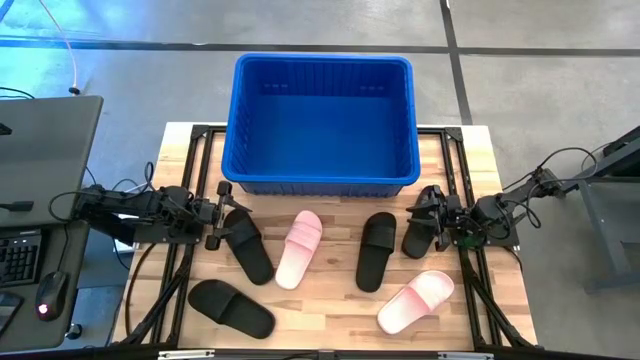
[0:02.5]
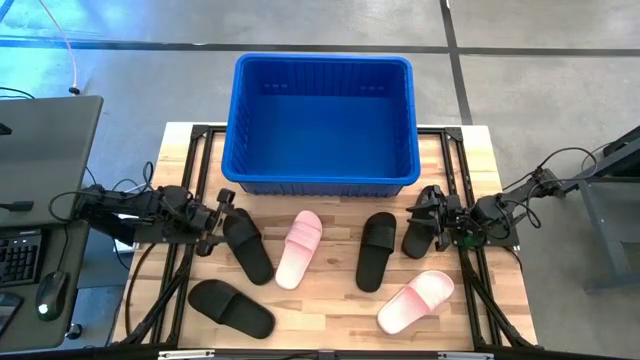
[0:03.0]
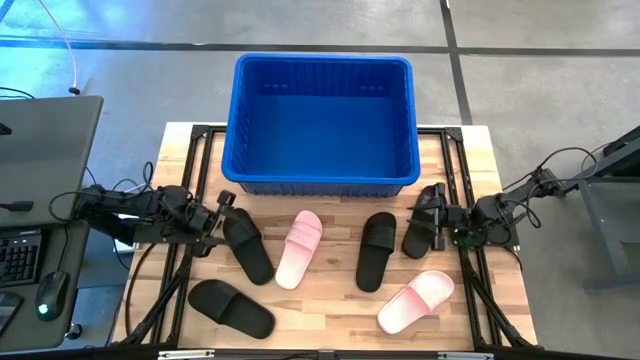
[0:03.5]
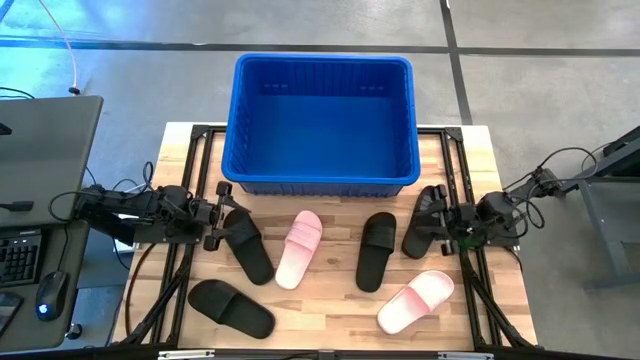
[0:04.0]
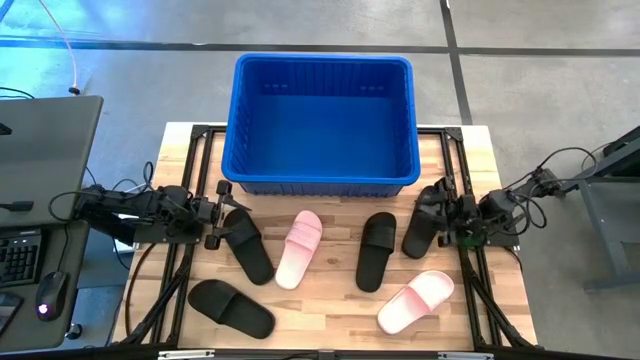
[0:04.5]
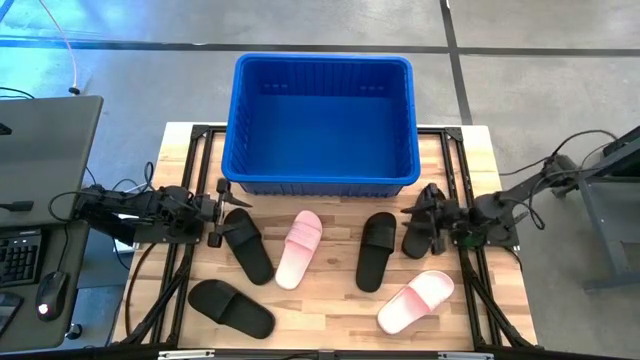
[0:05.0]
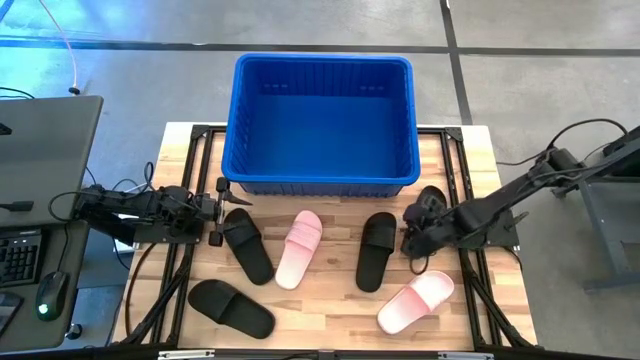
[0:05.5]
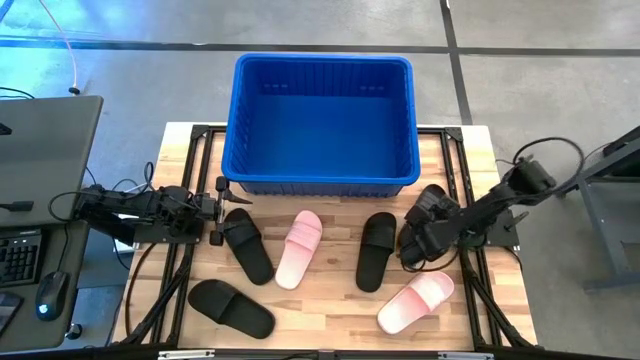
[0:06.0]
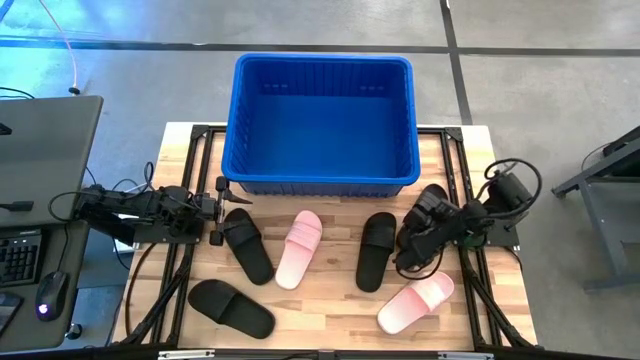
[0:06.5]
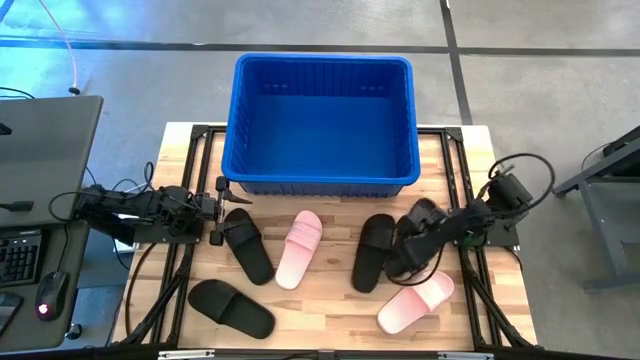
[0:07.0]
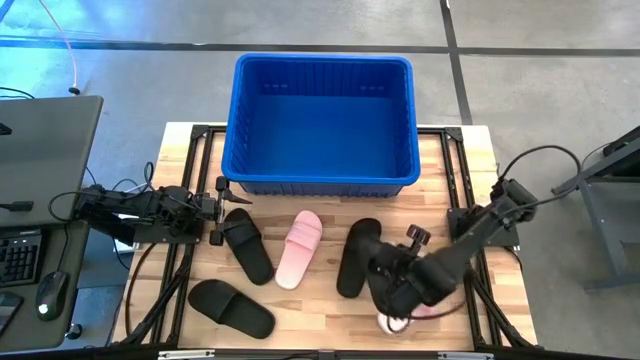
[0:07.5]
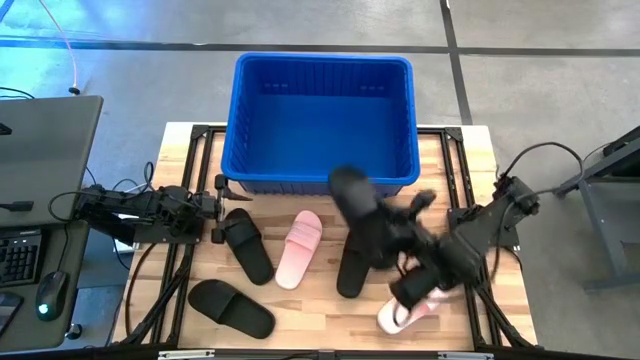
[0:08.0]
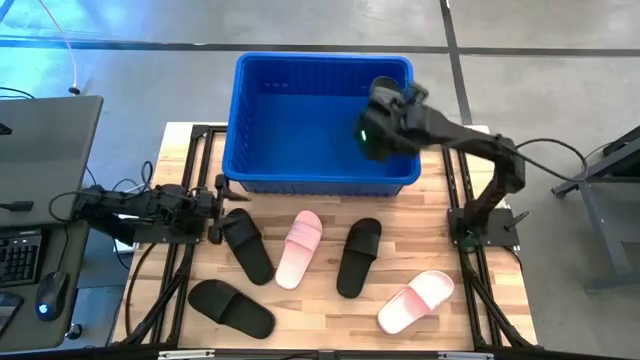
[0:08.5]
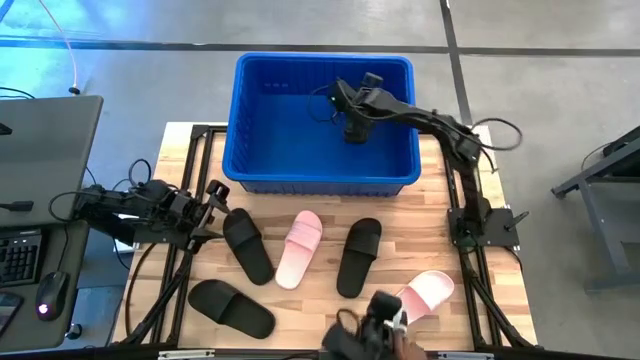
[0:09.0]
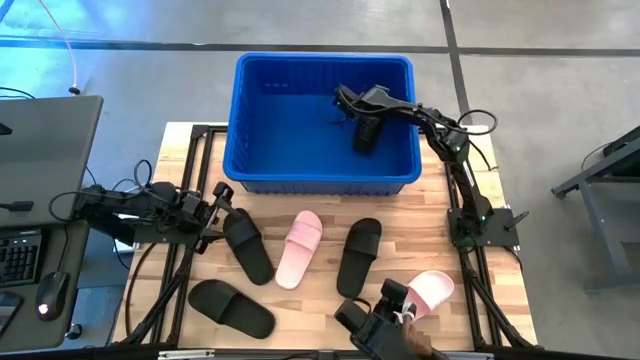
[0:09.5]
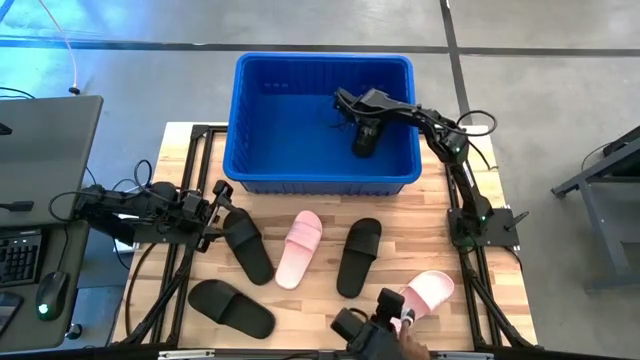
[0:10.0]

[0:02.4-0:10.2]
Task: Pick and place slides into bin
Put the black slide into the blue container

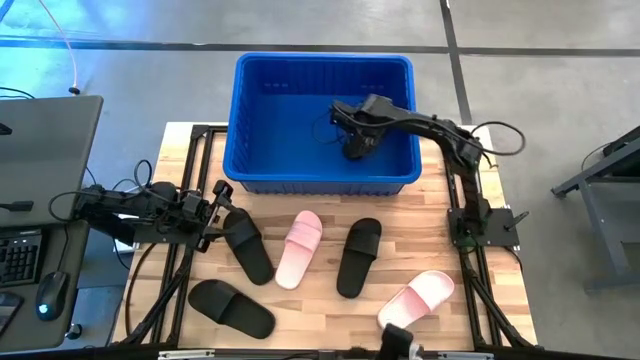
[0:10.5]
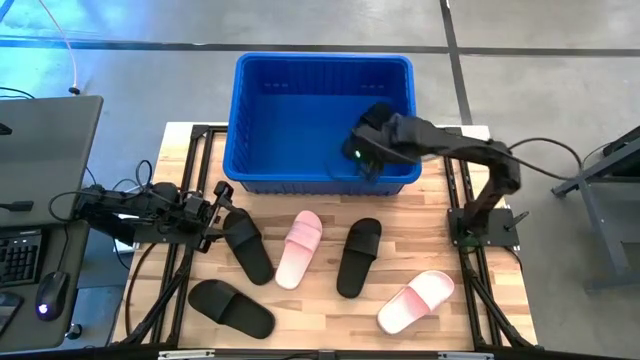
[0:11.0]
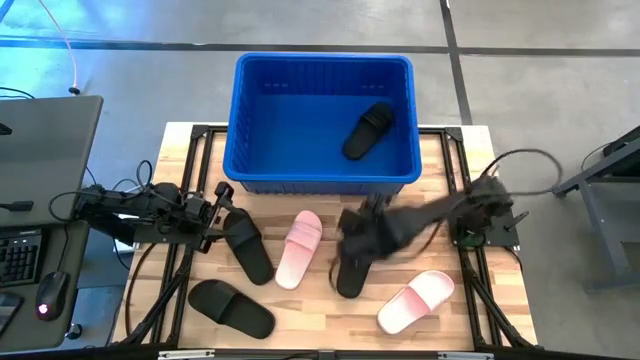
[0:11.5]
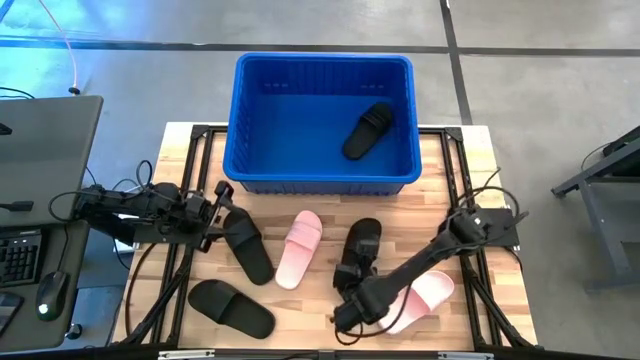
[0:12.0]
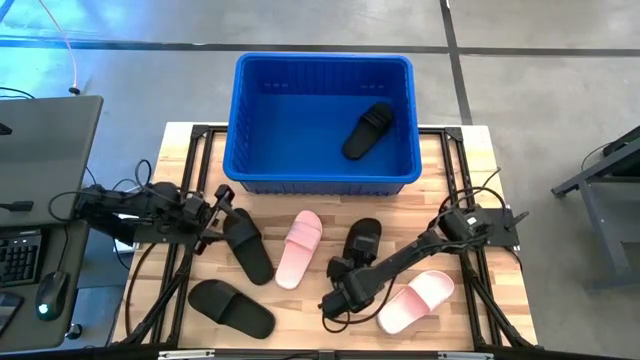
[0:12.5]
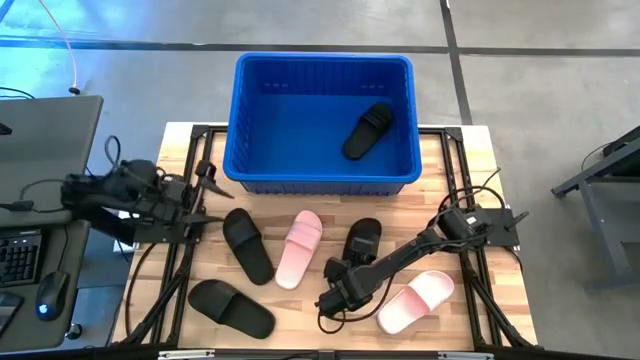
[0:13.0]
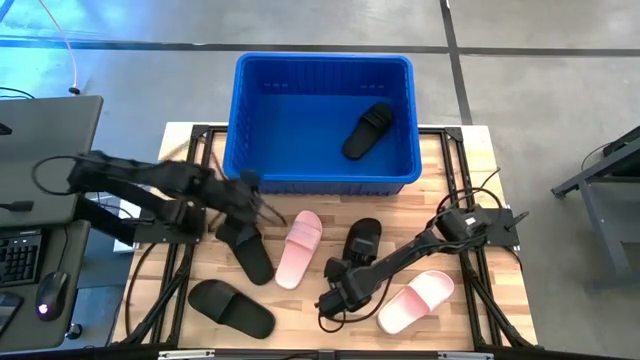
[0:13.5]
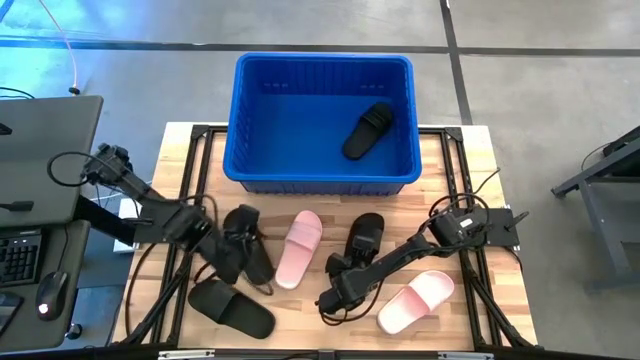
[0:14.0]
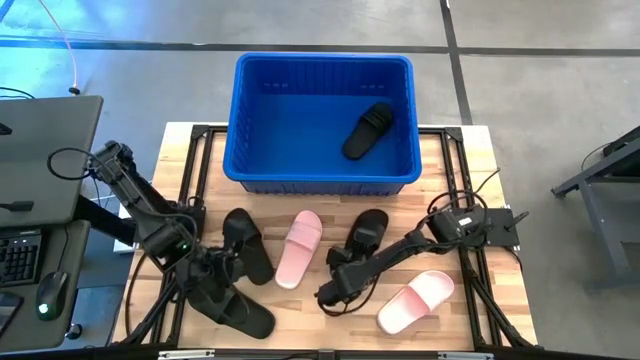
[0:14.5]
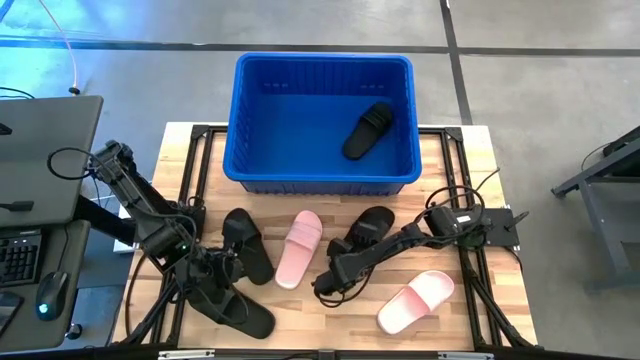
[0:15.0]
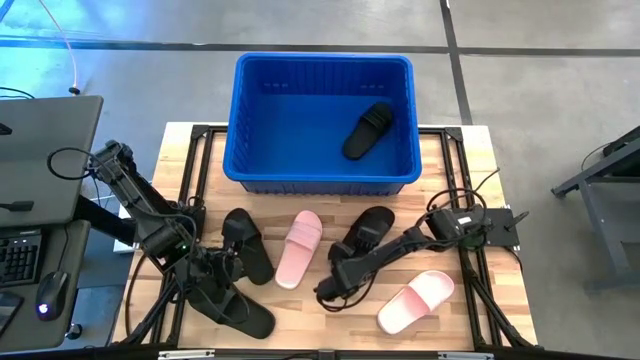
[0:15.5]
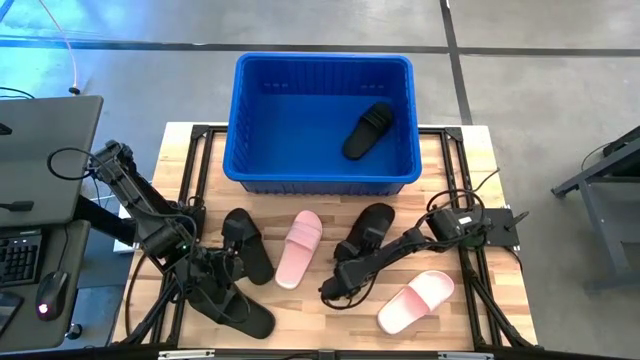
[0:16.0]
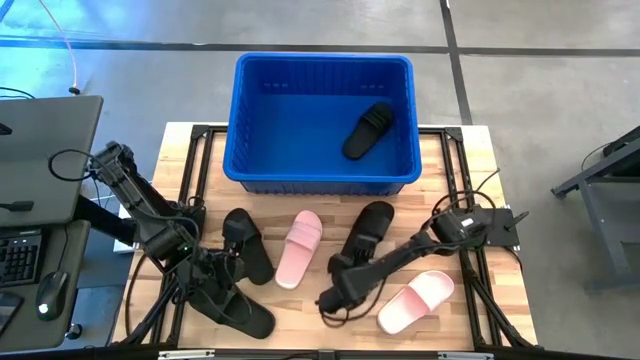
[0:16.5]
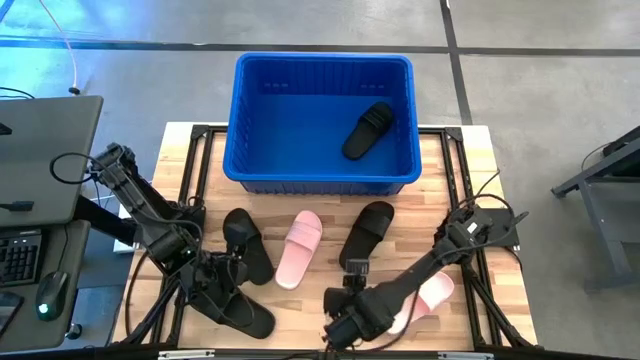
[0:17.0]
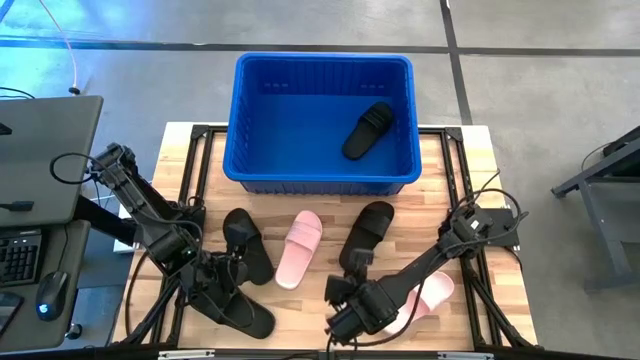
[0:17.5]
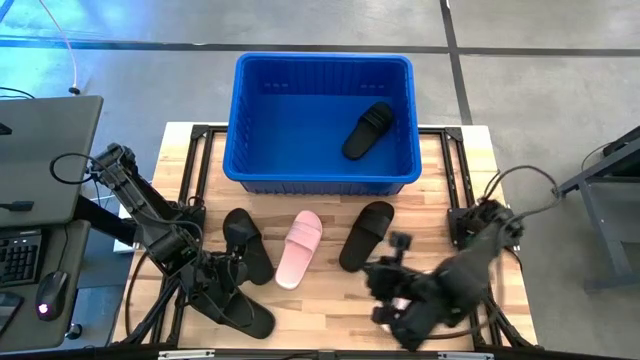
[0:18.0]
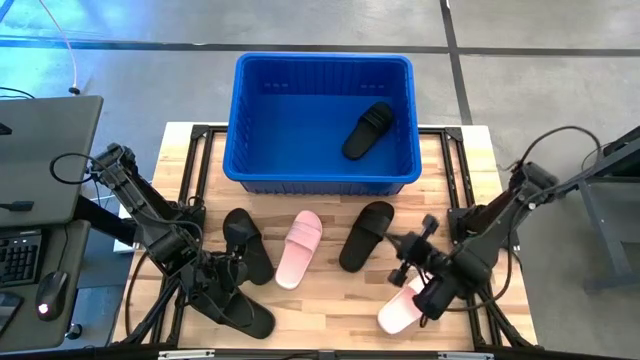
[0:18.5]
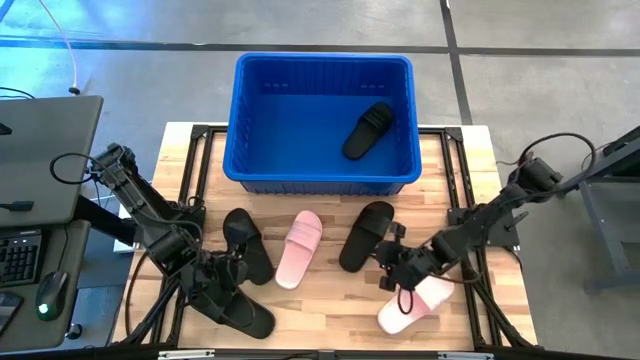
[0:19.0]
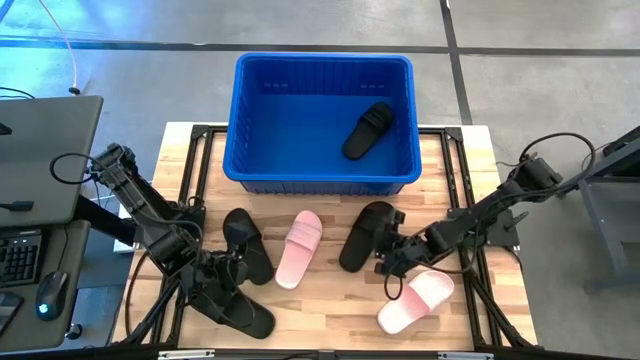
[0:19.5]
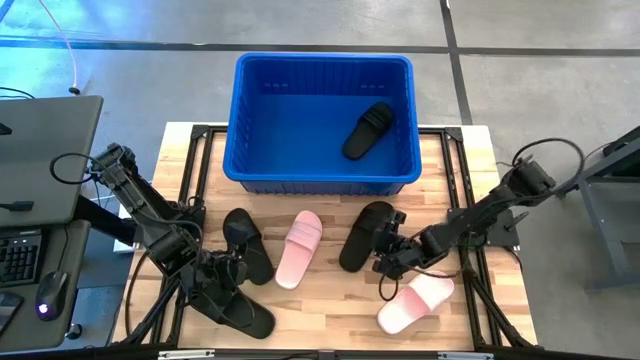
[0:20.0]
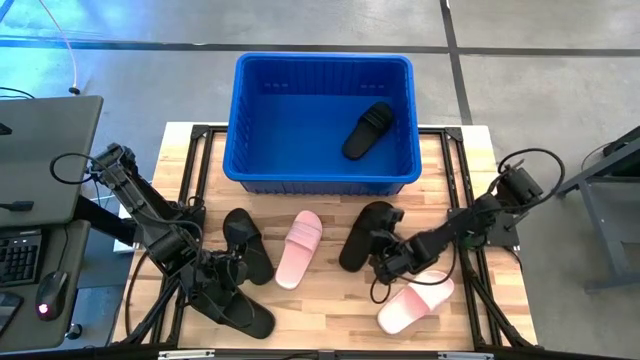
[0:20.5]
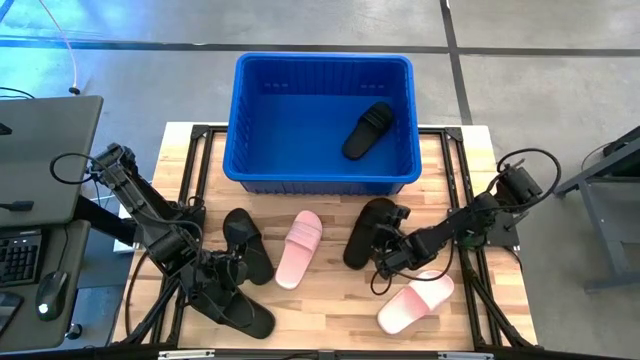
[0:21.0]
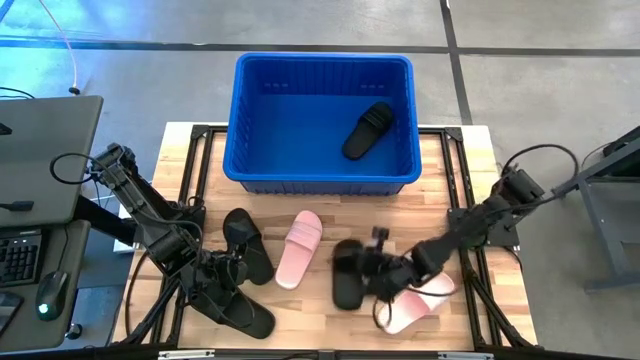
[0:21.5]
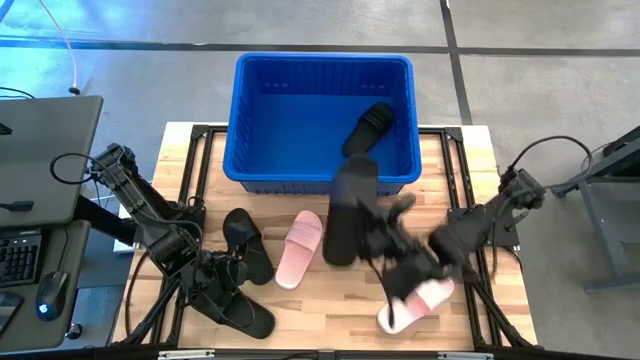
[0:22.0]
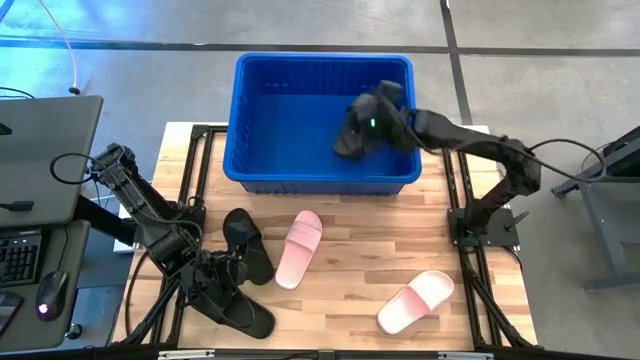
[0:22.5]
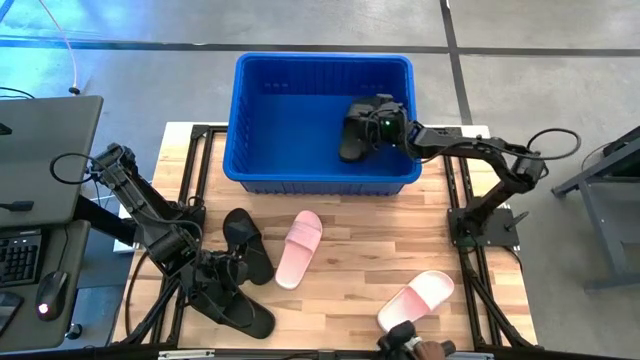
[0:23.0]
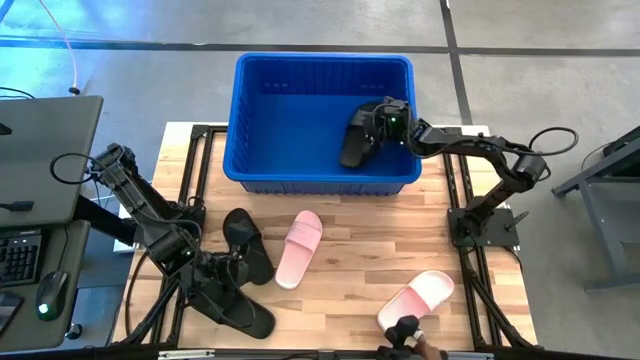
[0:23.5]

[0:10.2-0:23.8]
Put the black slide into the blue container
